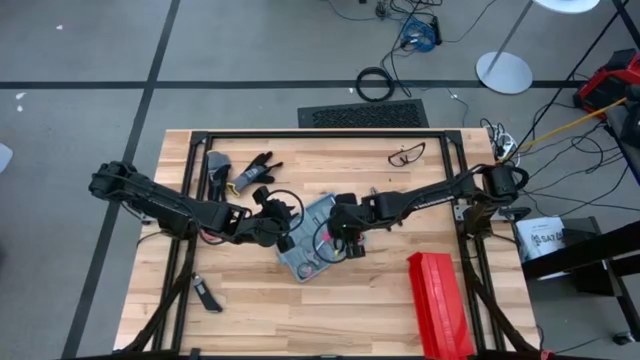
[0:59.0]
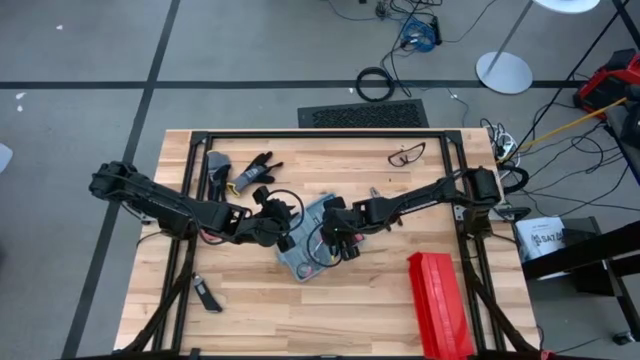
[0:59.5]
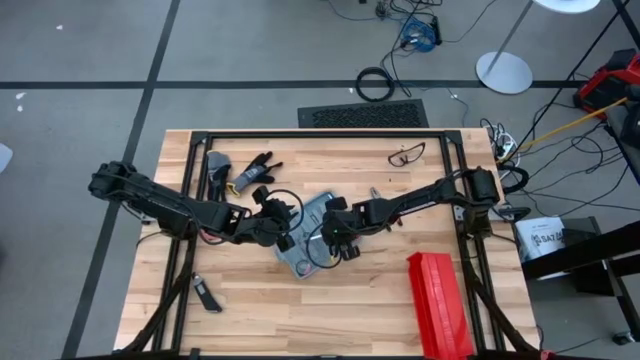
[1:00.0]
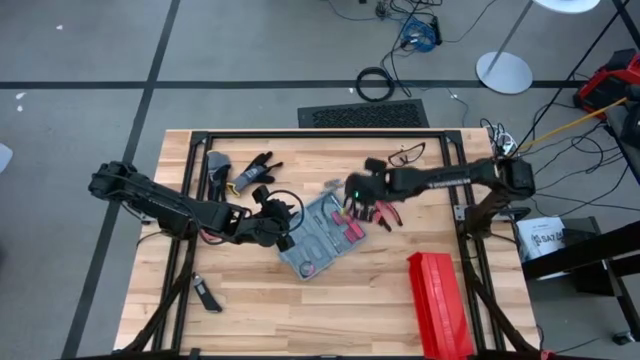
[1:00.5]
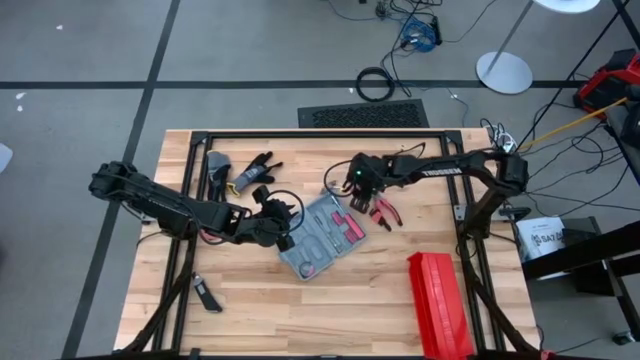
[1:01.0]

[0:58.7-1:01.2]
Task: prefit tool cases
Remove the red hammer from the gray prefit tools case

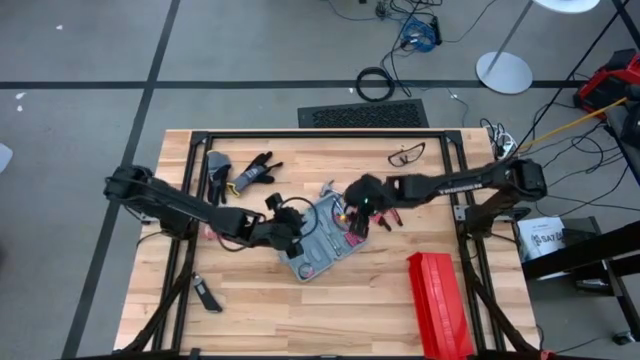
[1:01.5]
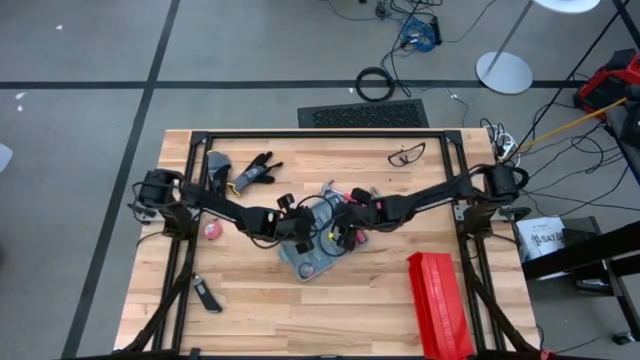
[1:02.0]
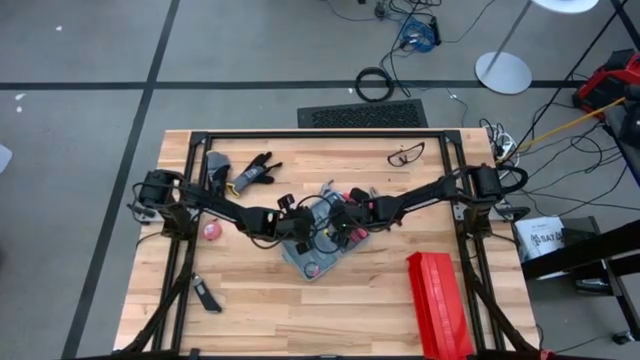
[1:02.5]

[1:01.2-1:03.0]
Remove the red terminal block from the gray prefit tools case

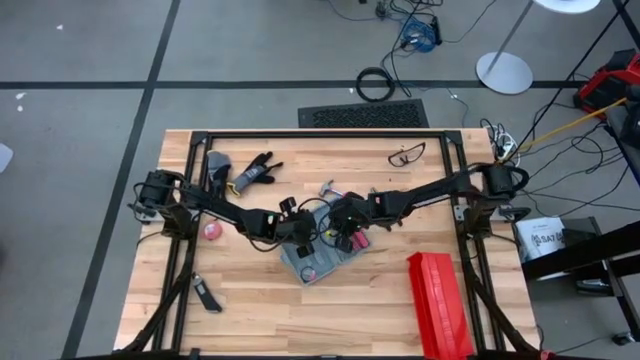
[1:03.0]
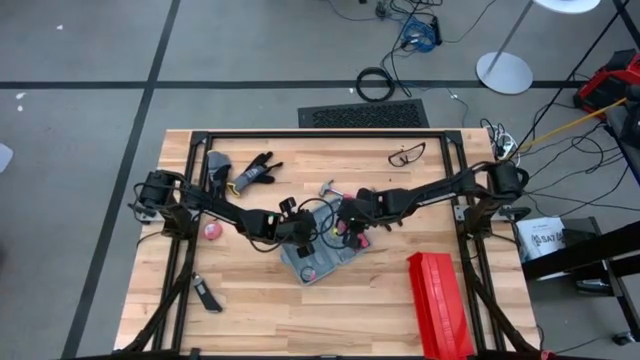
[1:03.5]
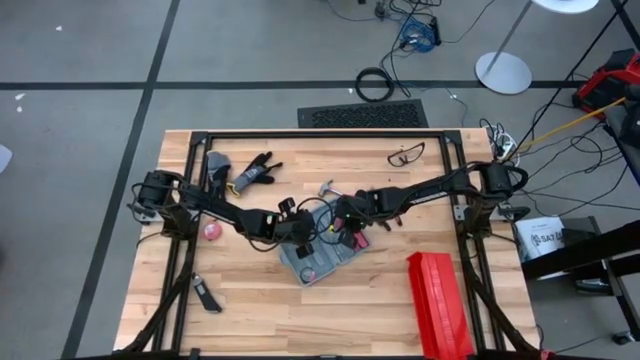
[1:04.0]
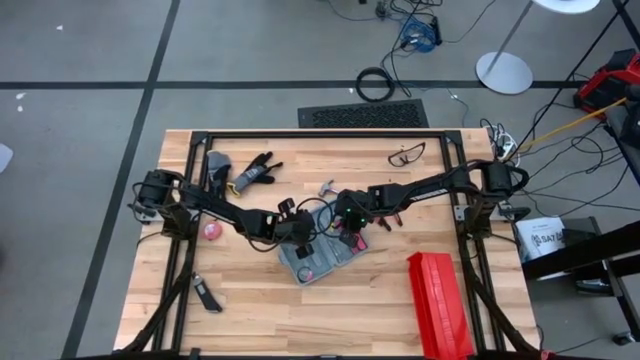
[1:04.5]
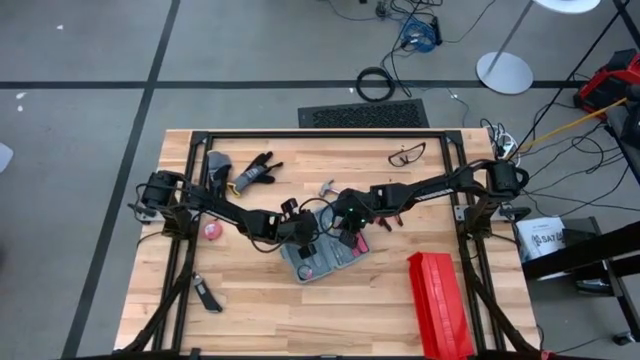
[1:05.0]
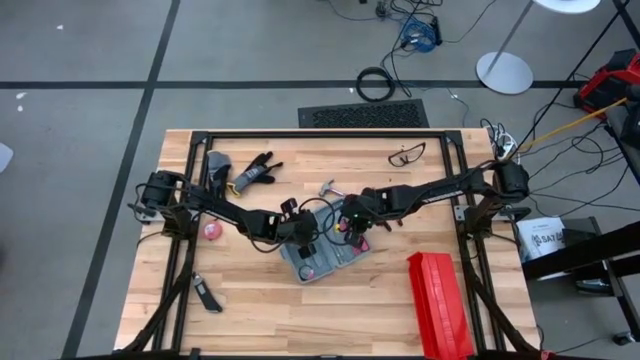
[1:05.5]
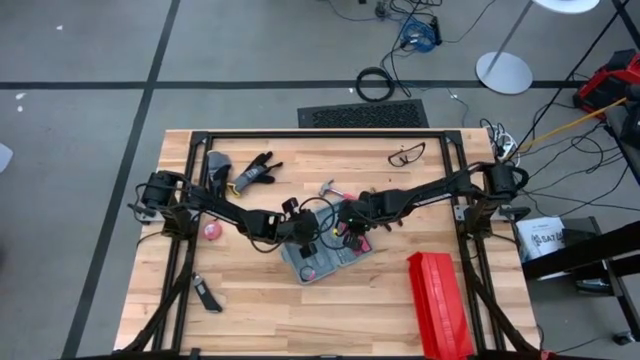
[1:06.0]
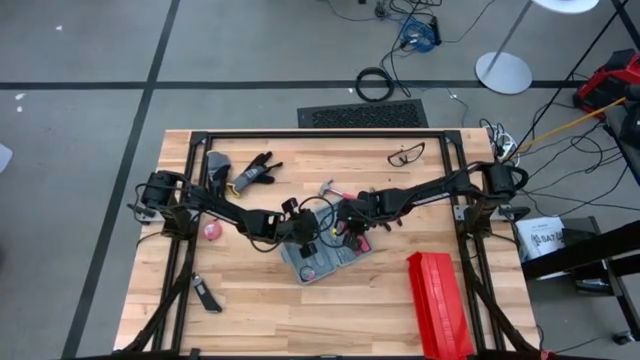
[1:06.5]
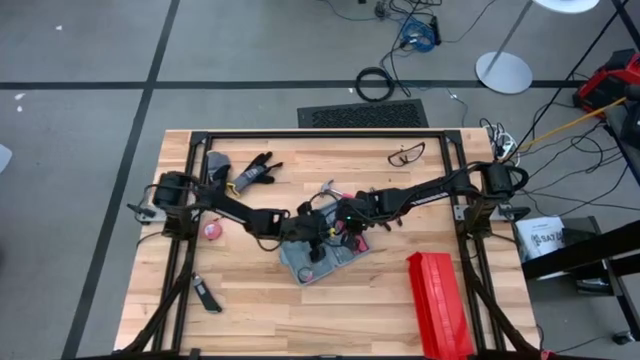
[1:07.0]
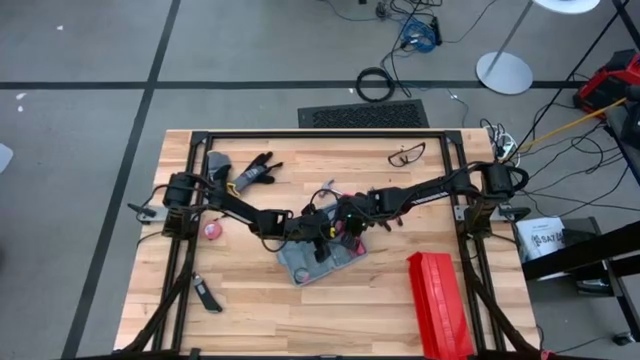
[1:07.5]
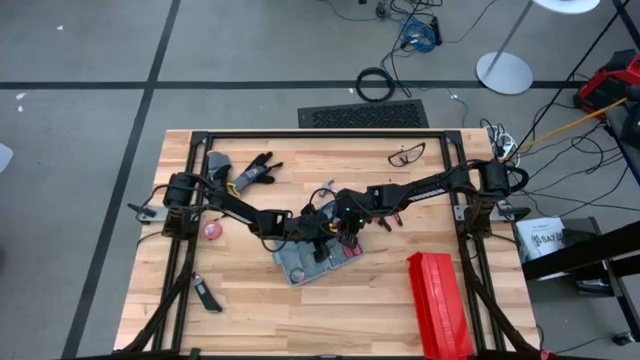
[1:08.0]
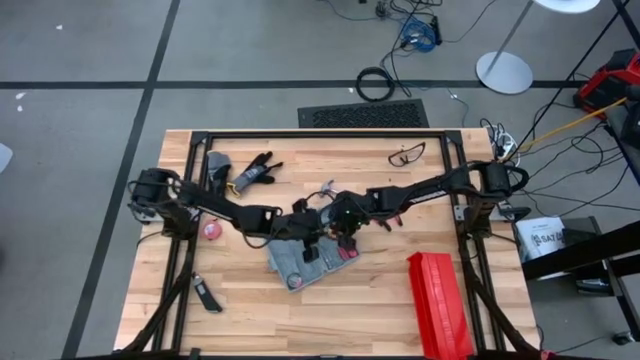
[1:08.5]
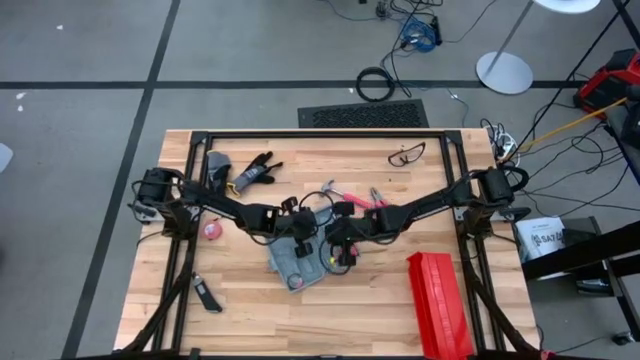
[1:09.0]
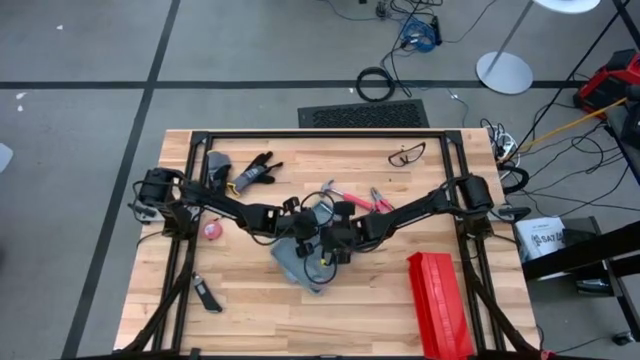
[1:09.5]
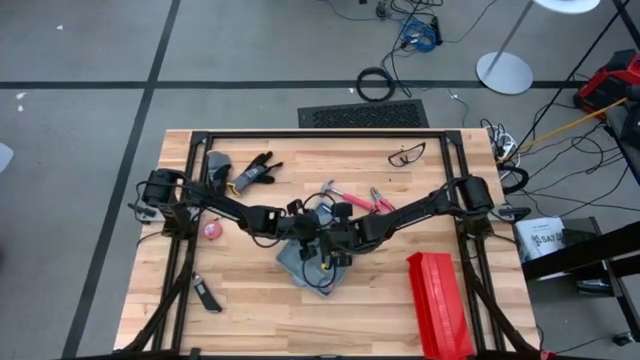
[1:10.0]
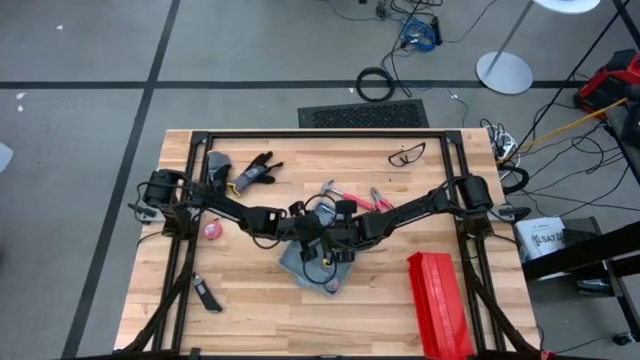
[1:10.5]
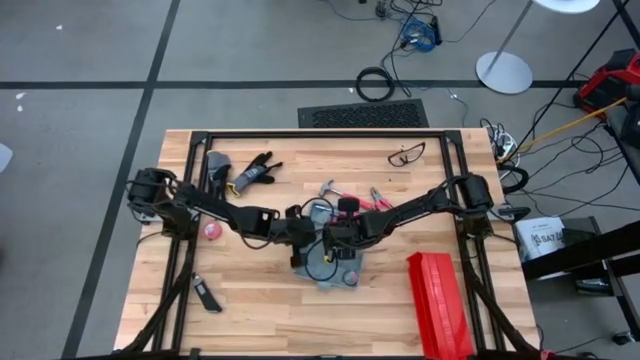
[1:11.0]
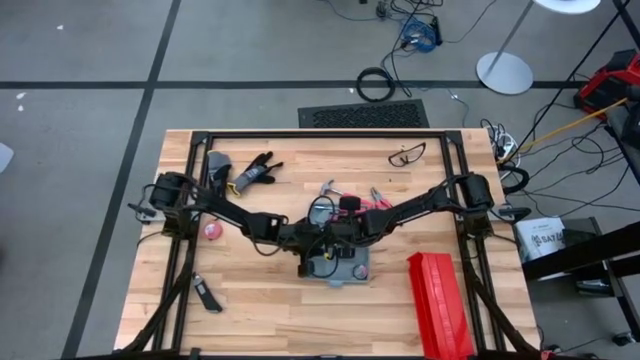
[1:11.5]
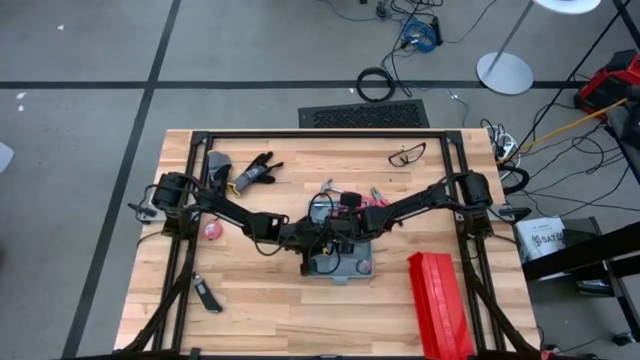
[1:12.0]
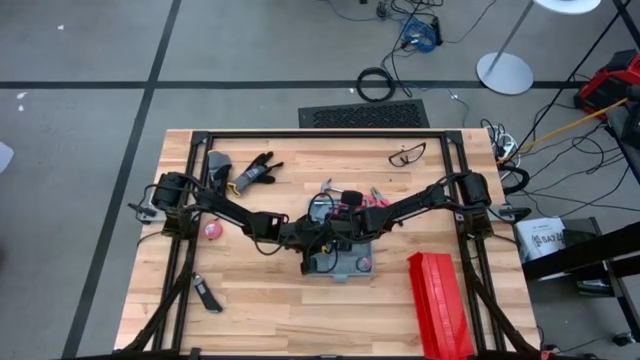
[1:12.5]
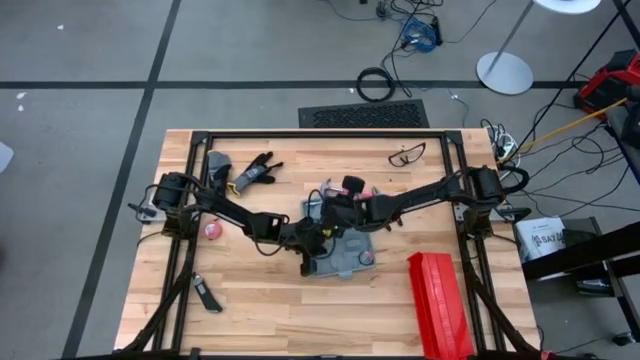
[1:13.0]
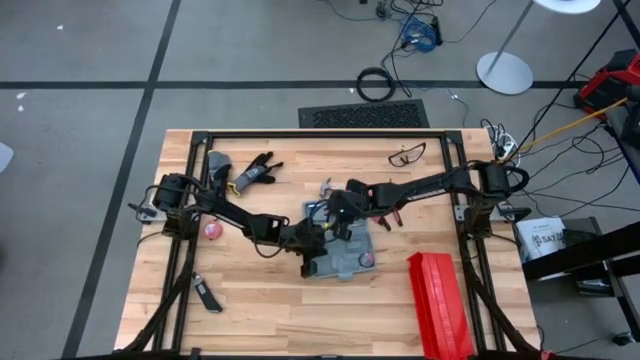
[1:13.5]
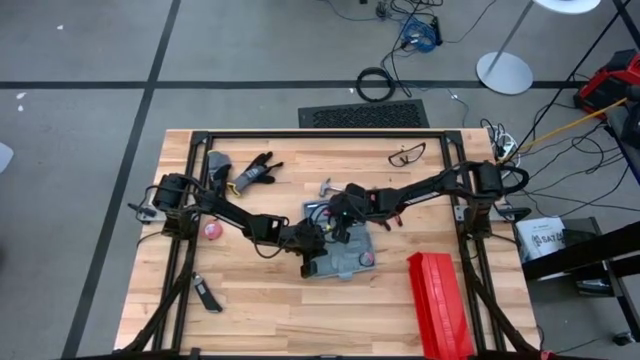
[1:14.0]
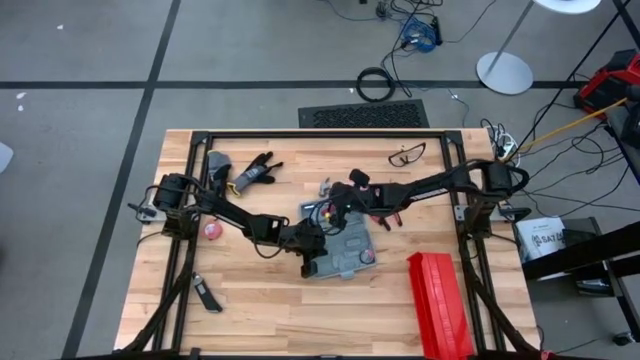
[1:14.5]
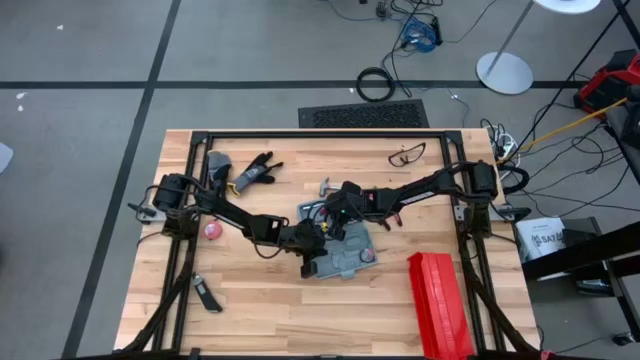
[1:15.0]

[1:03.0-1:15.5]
Remove the red terminal block from the gray prefit tools case

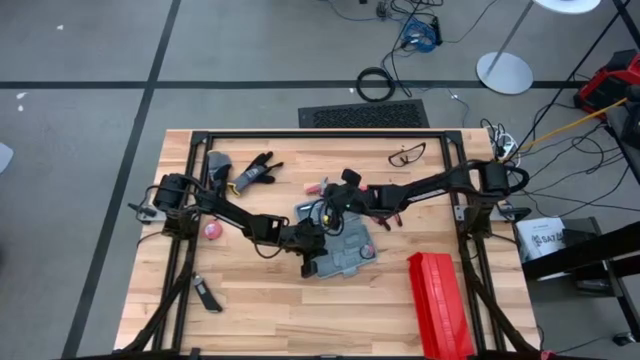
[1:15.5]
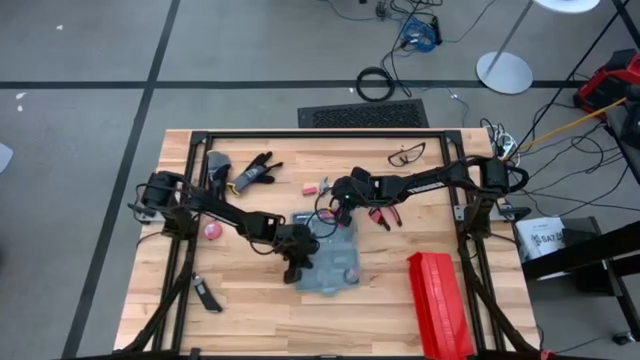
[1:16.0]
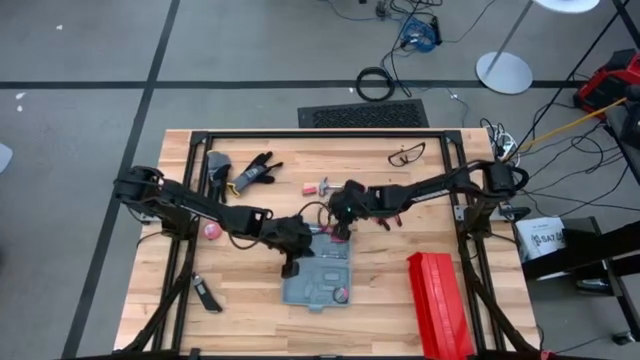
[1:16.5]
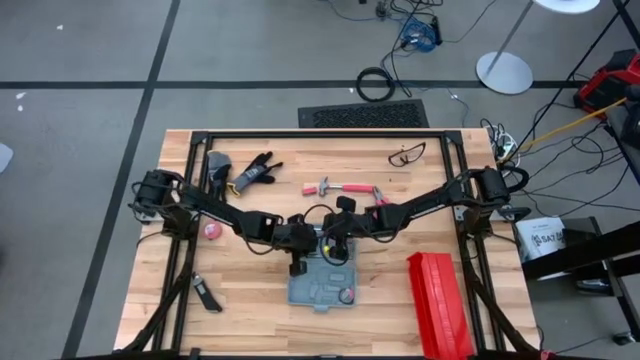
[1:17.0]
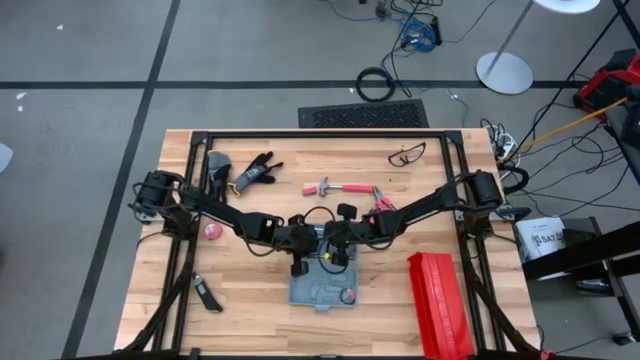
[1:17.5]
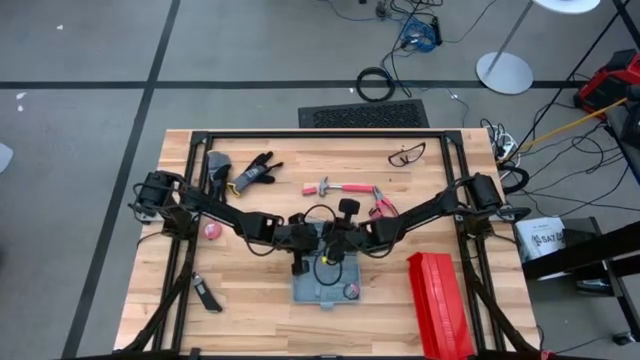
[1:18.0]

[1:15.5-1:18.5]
Remove the red screwdriver from the gray prefit tools case

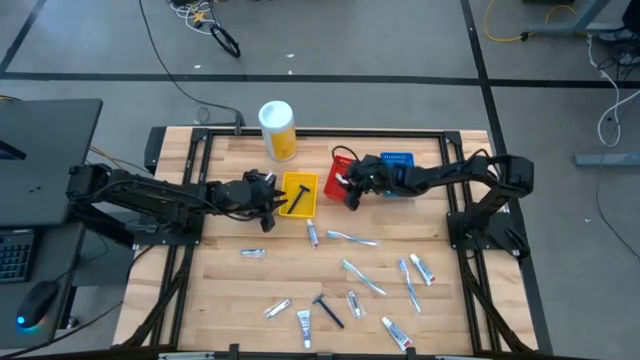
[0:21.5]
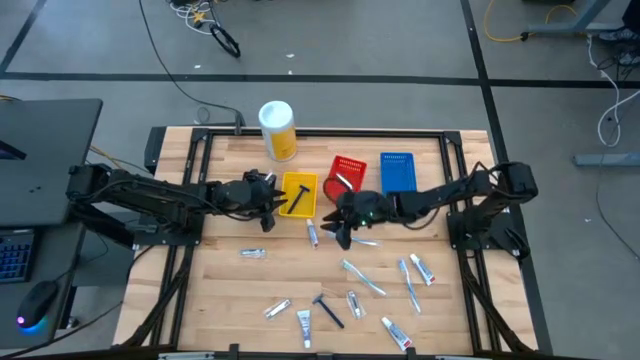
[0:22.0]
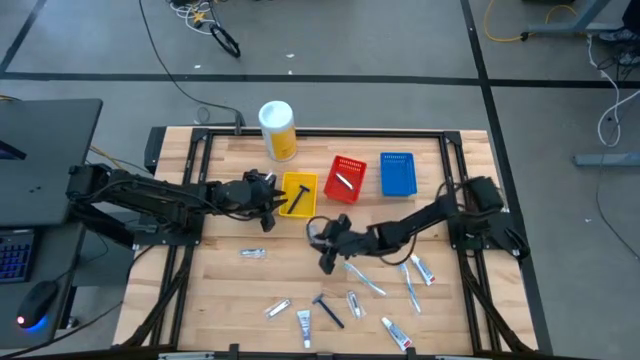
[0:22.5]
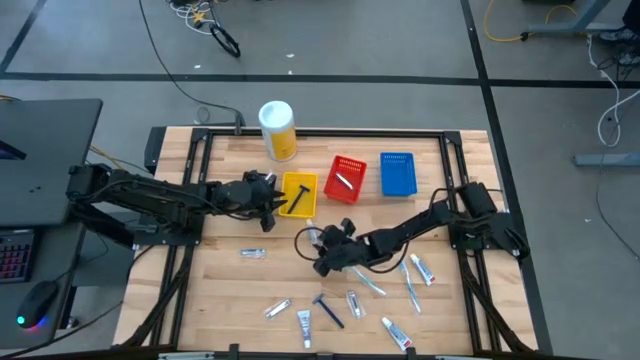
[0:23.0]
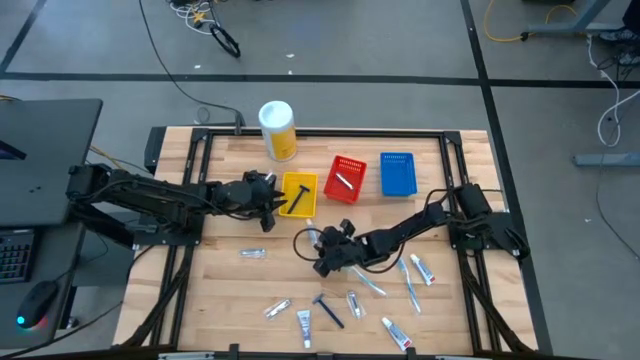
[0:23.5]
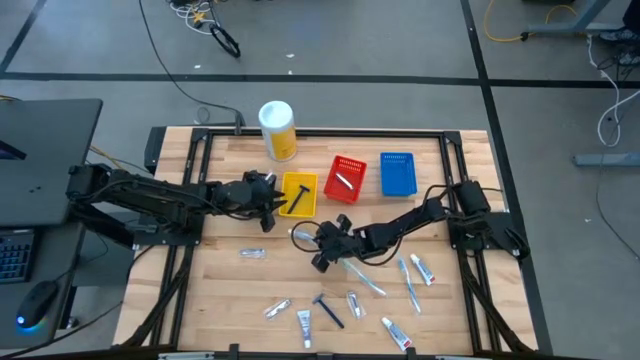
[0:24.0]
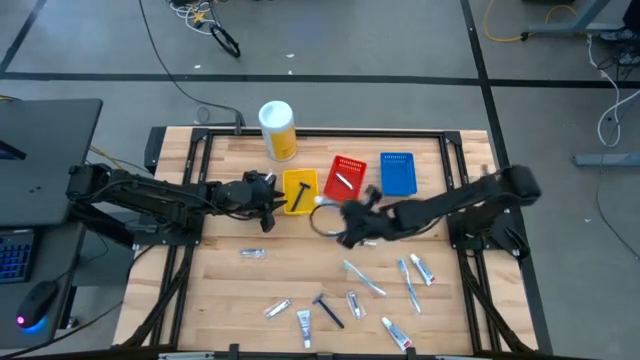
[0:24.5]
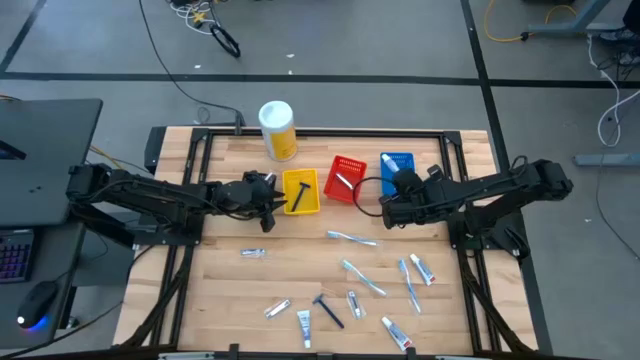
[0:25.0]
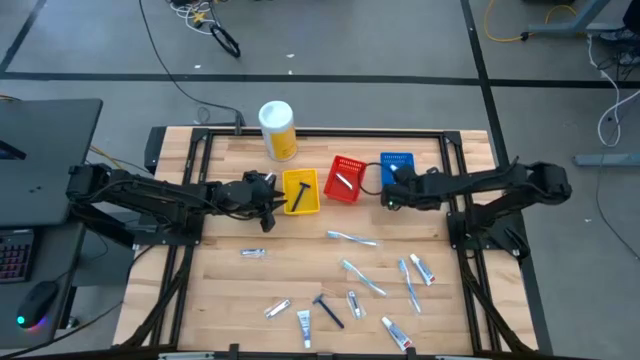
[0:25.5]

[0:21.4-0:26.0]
Task: Pick & Place Travel size toiletries
Put the white toothpaste into the blue bin
